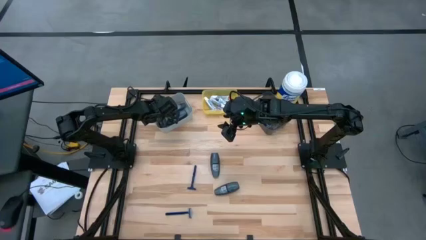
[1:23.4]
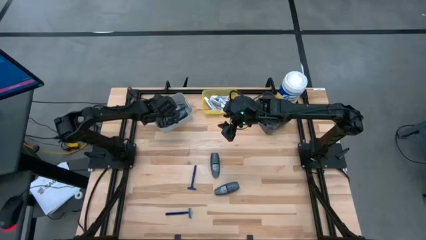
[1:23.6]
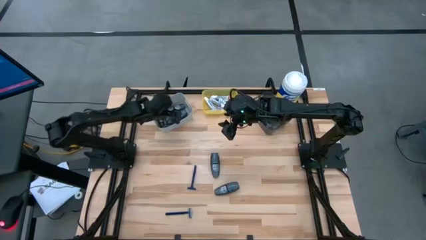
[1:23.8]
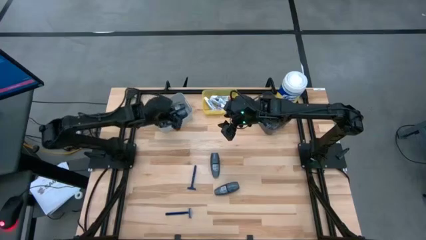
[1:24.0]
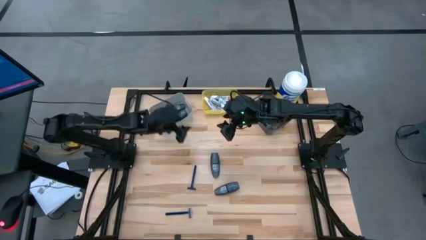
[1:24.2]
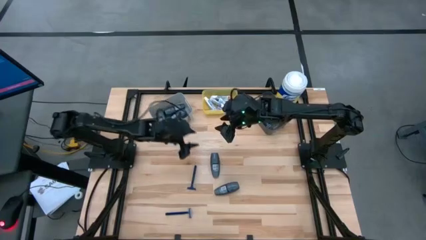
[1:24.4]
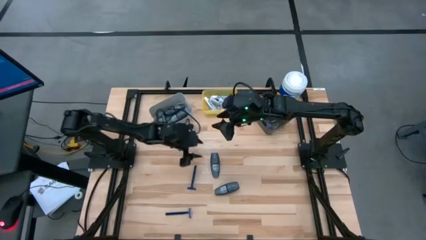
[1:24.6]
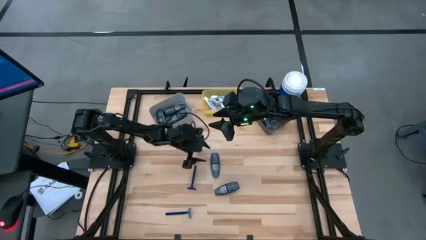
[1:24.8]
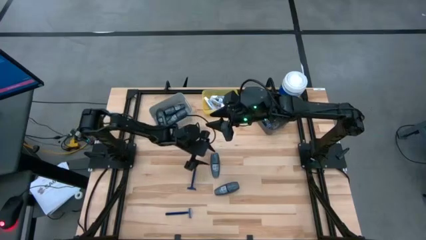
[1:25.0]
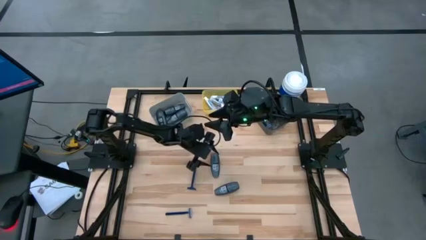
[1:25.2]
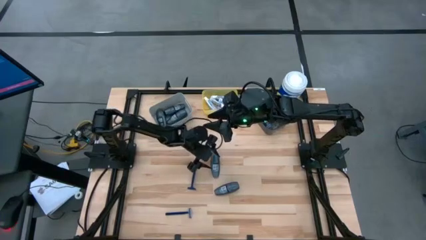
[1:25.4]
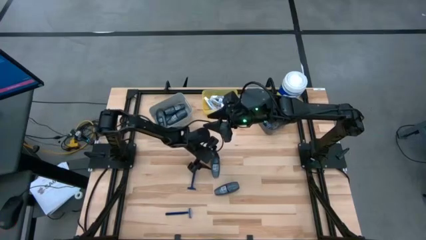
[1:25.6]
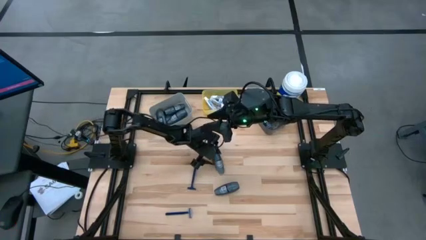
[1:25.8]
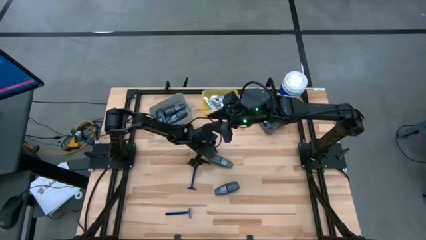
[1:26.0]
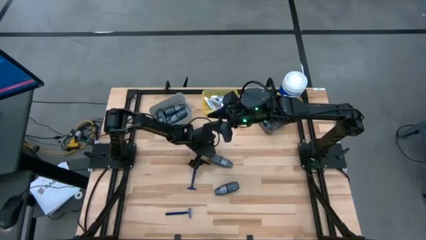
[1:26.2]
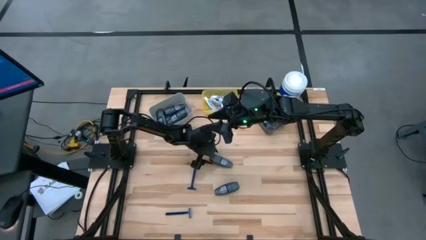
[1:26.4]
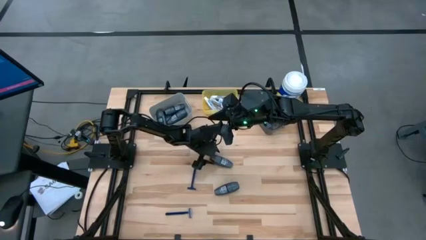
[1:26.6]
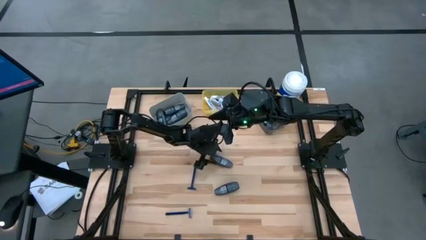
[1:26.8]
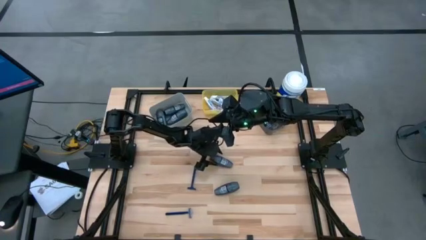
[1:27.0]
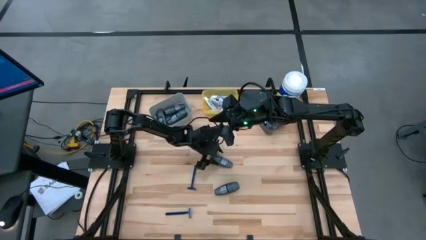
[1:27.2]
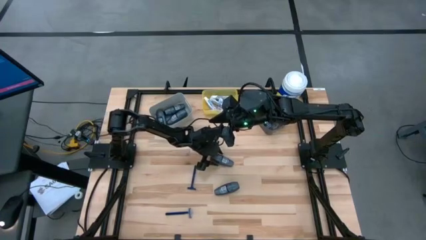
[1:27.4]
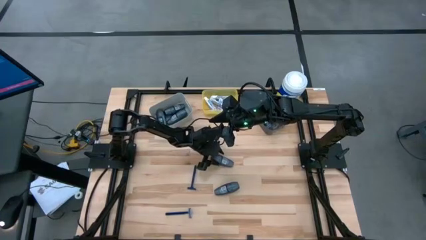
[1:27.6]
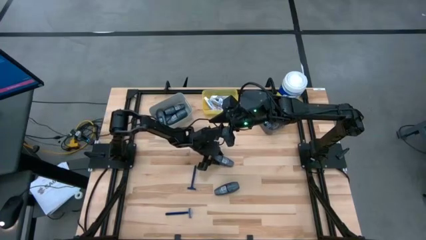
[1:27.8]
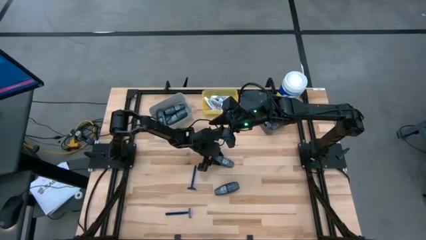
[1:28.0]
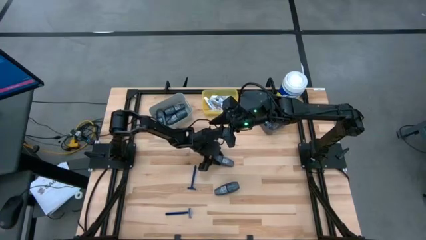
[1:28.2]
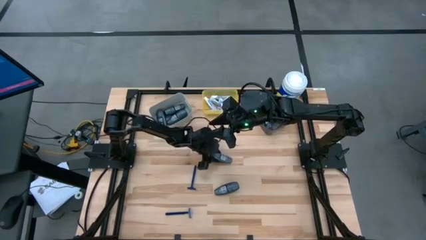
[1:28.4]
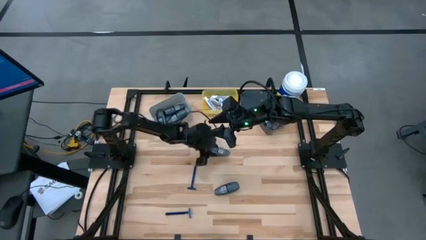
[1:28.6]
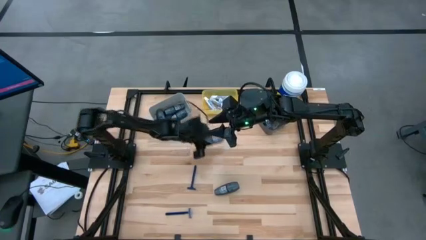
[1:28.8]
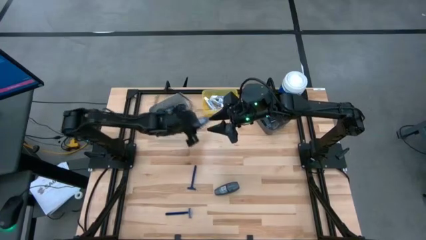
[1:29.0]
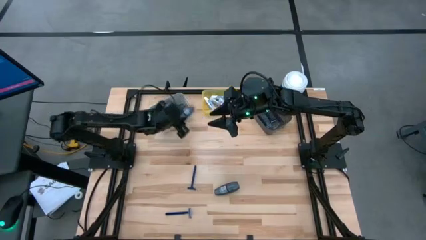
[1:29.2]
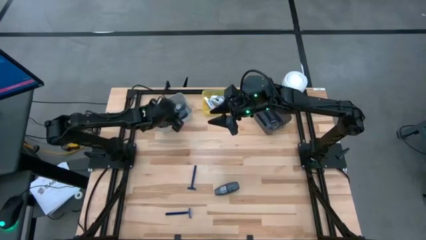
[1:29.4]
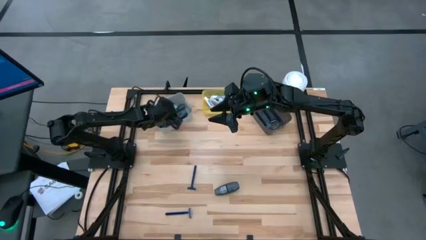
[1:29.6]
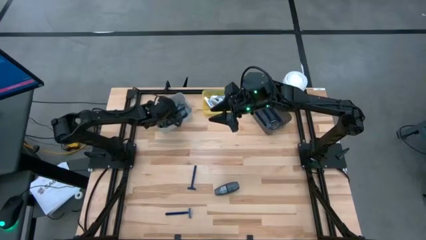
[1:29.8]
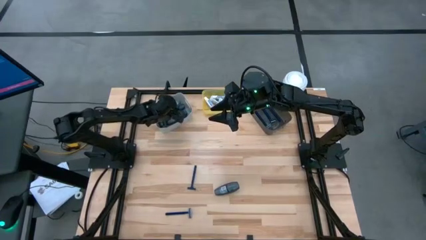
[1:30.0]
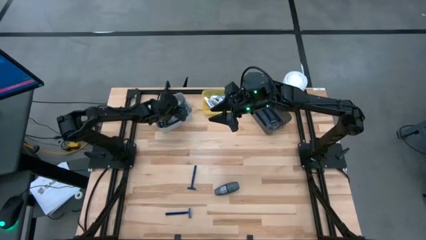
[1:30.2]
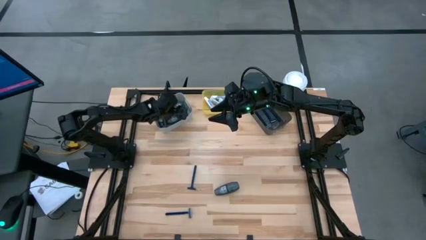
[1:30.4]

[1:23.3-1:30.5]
Task: Pick & Place Travel size toiletries
Put the gray deodorant into the gray bin

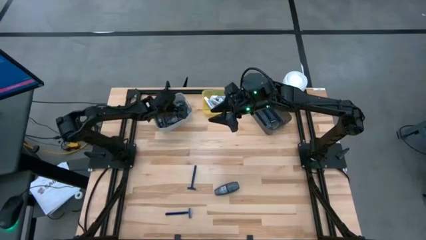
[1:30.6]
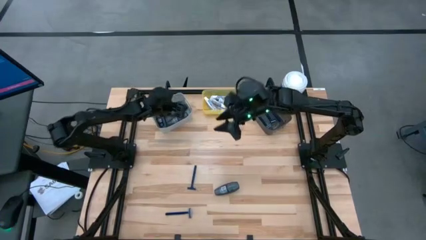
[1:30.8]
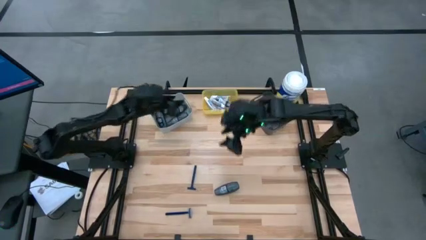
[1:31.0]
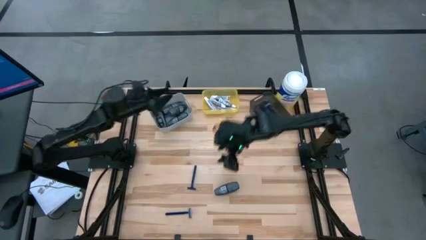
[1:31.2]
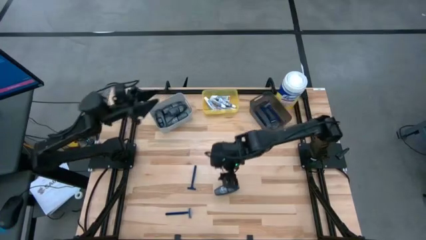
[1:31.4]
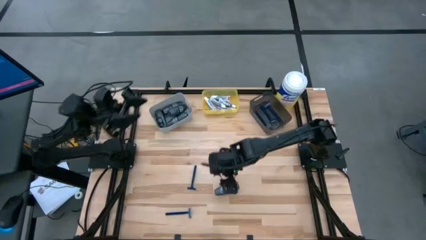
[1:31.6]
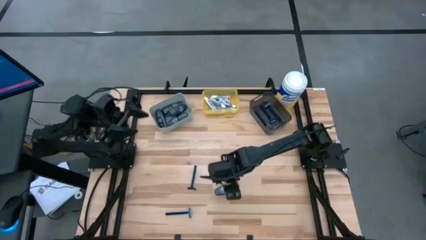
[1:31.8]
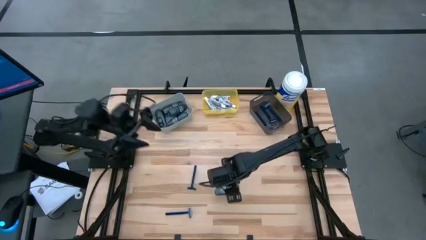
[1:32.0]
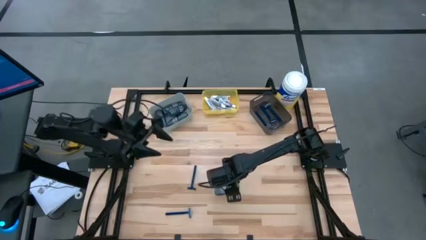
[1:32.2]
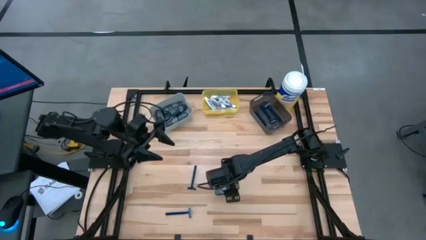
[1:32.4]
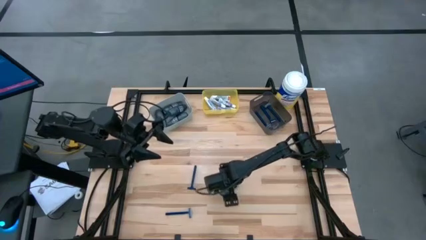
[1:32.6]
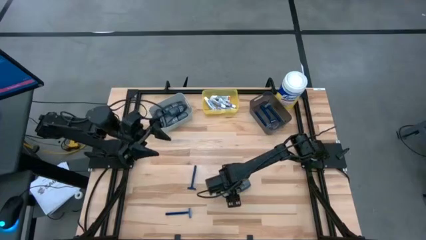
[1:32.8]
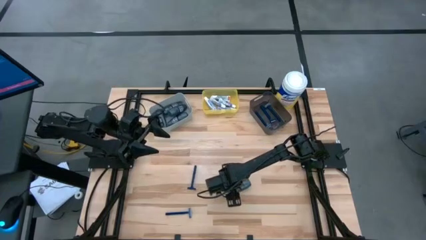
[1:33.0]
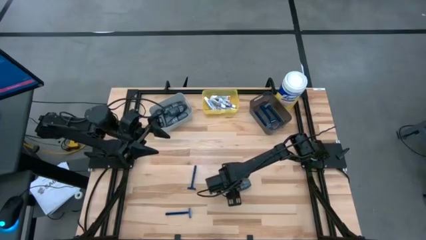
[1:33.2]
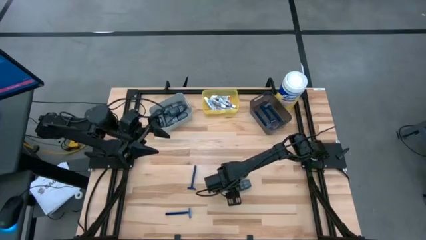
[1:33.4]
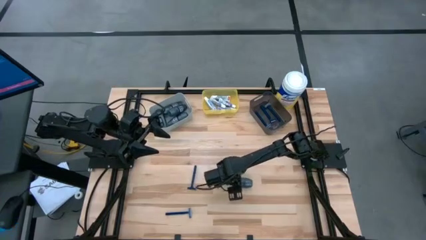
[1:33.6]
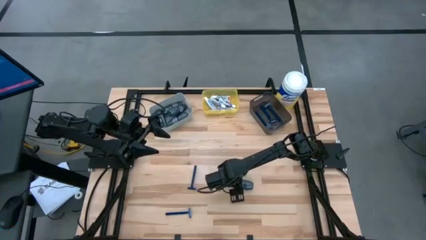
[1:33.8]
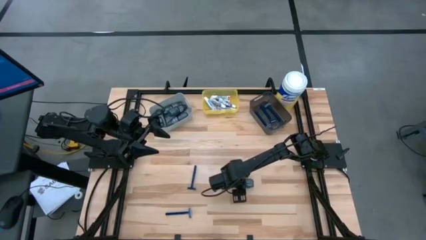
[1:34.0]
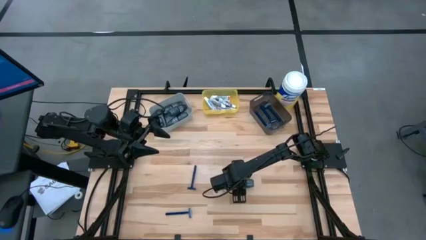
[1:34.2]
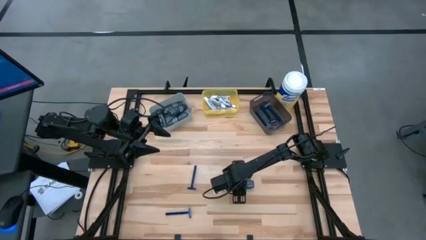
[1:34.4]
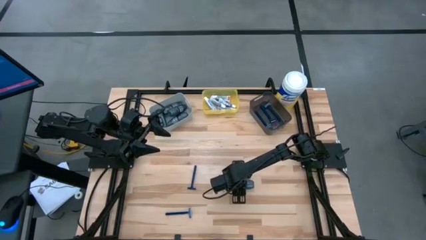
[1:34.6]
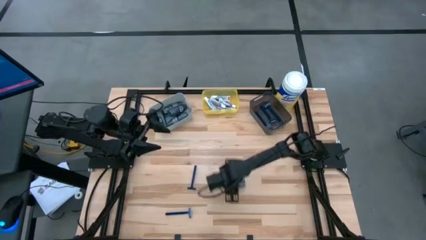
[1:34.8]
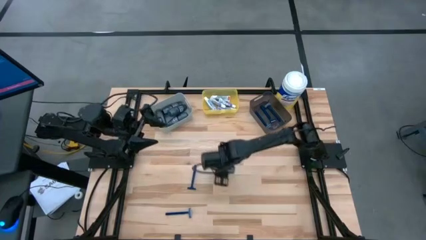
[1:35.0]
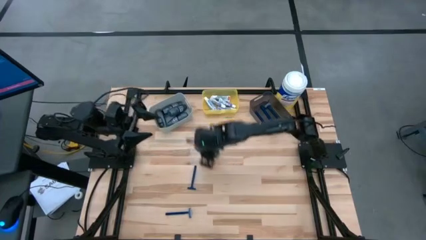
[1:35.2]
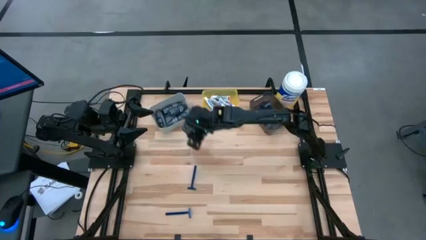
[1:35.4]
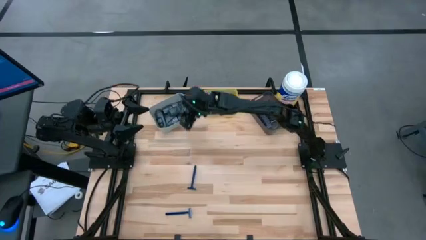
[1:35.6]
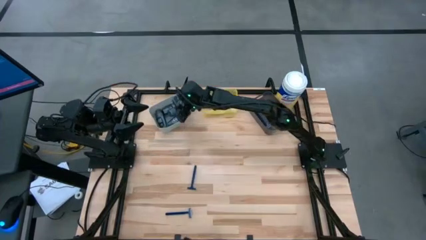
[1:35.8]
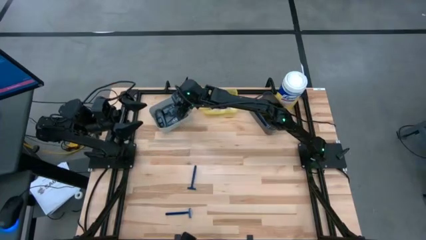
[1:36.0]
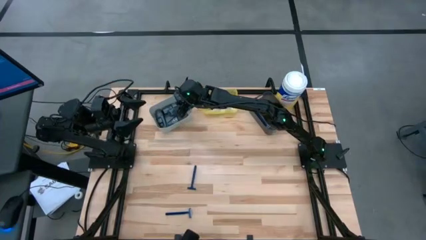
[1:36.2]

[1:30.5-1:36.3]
Put the gray deodorant into the gray bin

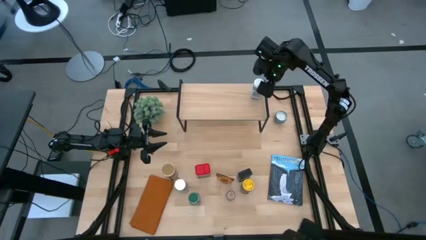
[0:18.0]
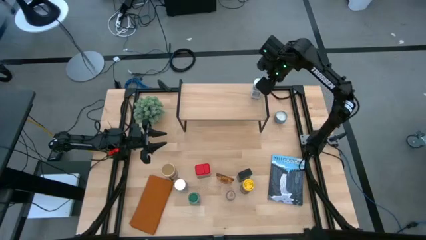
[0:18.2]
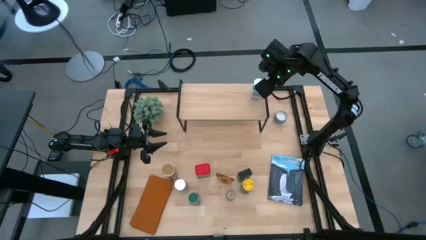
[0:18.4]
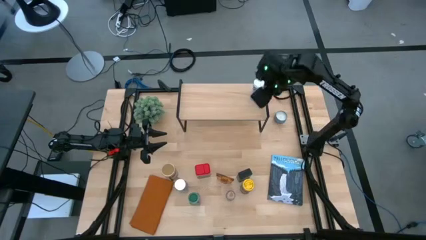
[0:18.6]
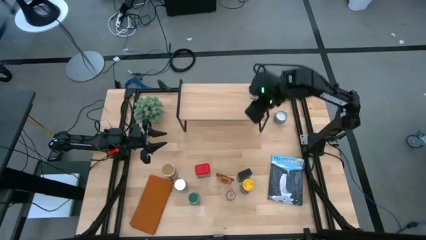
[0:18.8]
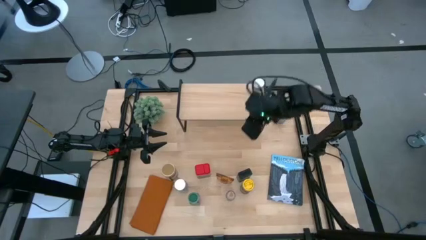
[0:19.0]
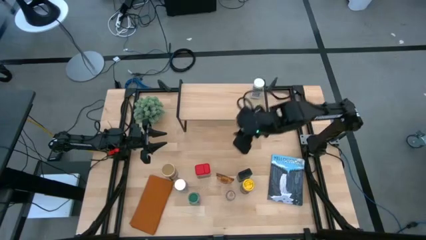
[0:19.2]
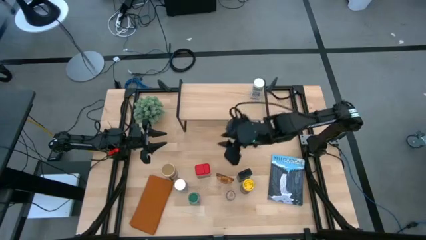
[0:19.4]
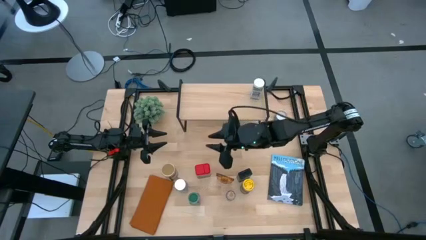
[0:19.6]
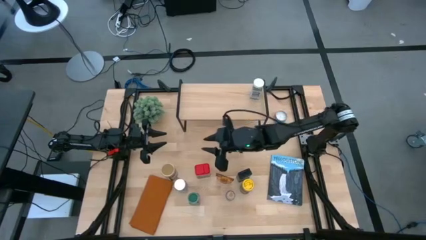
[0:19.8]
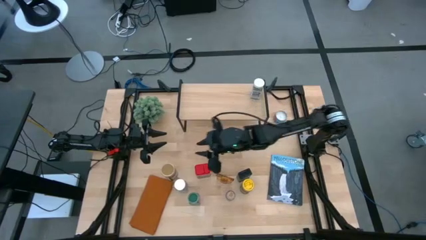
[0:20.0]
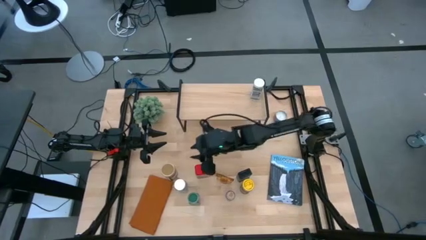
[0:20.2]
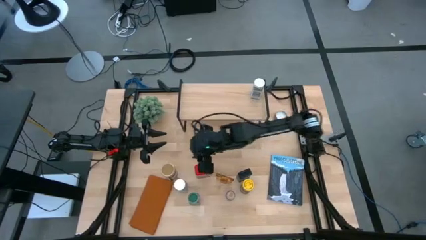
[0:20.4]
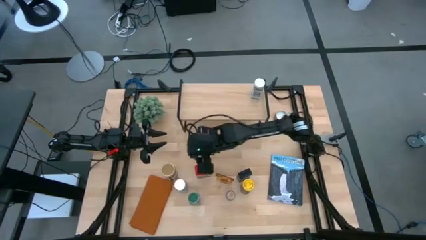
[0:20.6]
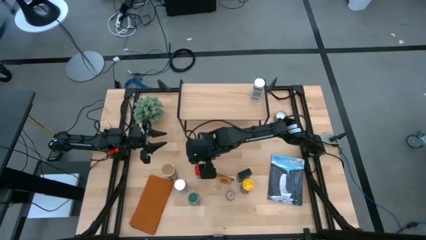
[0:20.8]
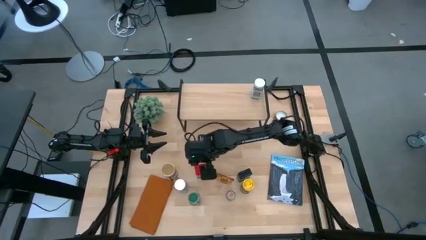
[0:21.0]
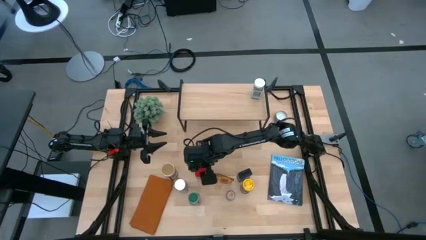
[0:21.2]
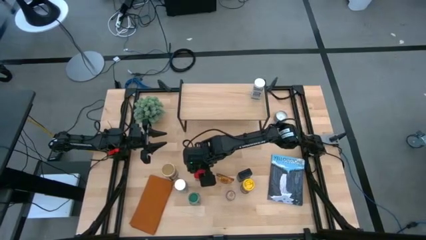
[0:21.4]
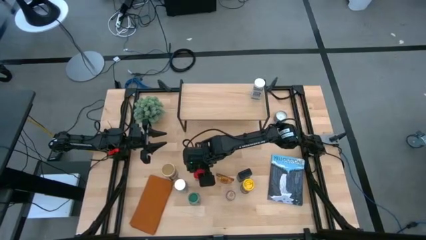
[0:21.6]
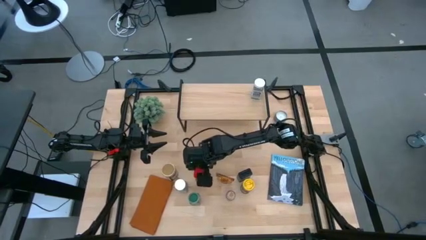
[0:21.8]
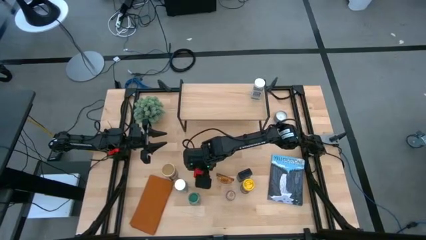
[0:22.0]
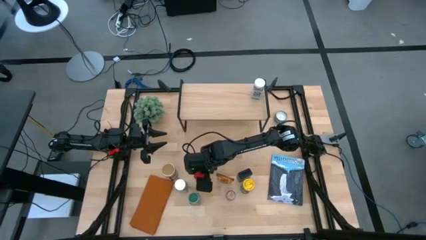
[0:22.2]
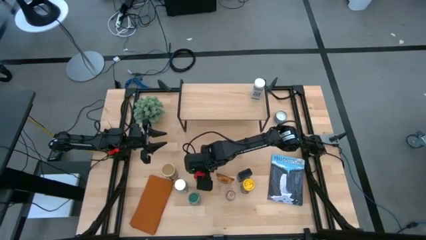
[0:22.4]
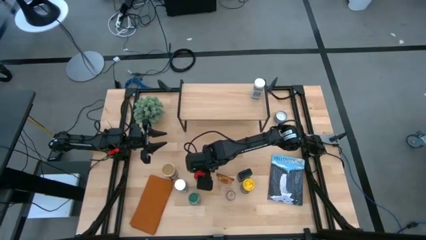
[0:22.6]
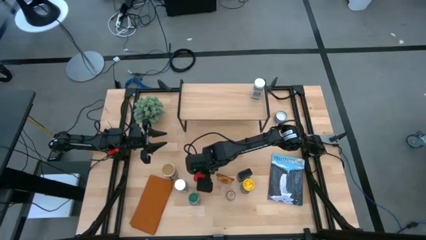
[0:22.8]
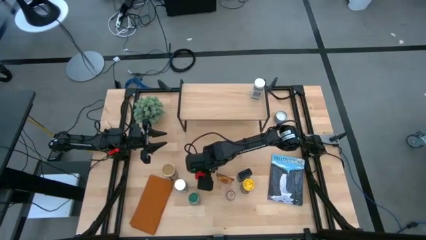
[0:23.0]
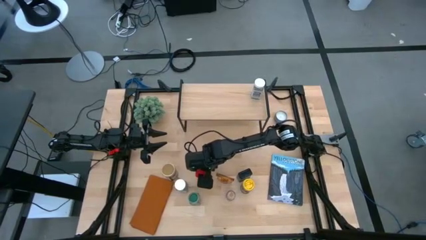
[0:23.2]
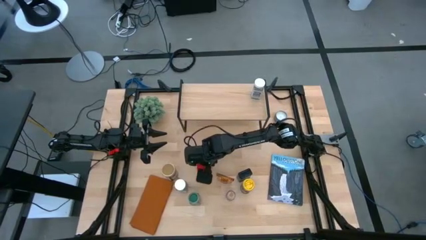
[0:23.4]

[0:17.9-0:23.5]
Task: Shelf spices
Put the red seasoning can on the shelf
